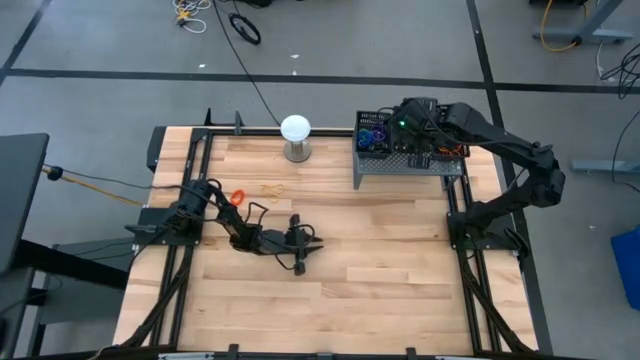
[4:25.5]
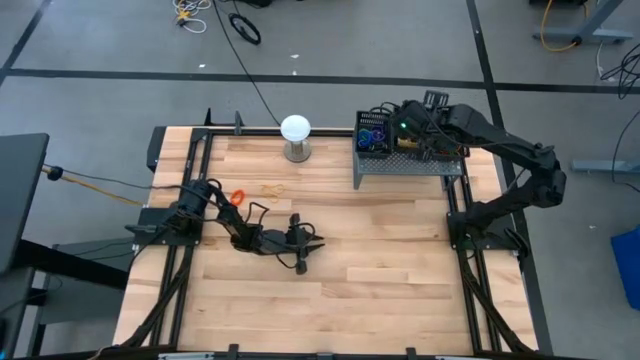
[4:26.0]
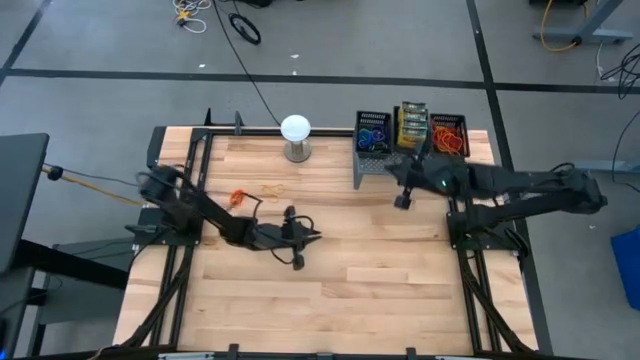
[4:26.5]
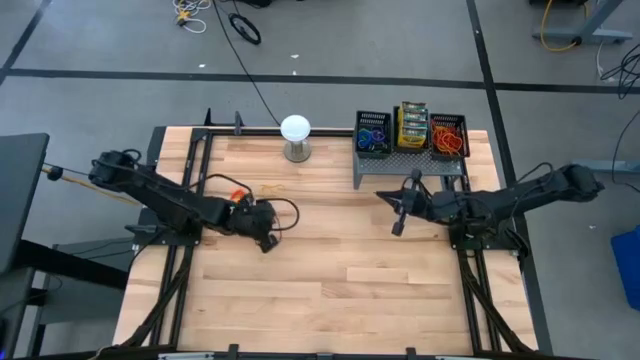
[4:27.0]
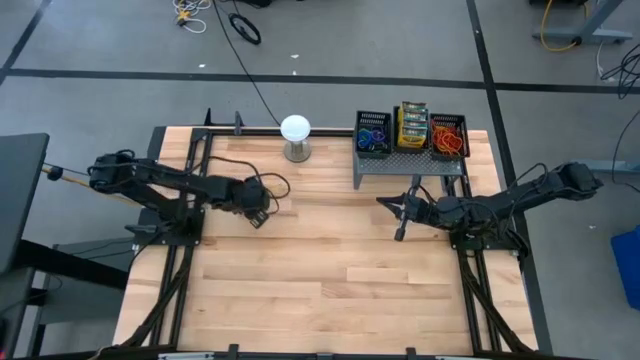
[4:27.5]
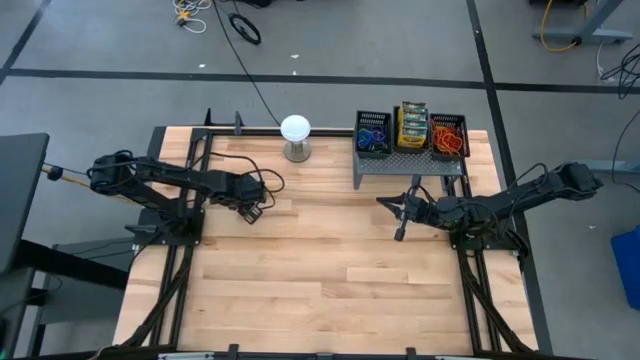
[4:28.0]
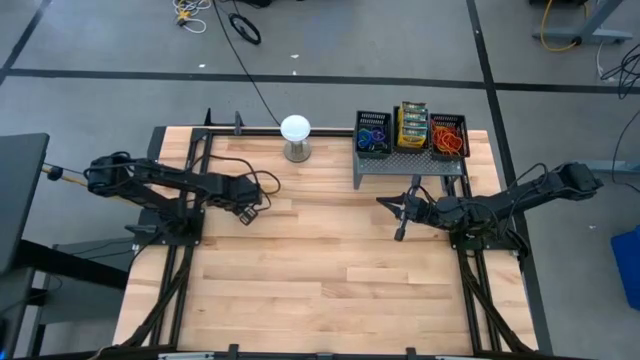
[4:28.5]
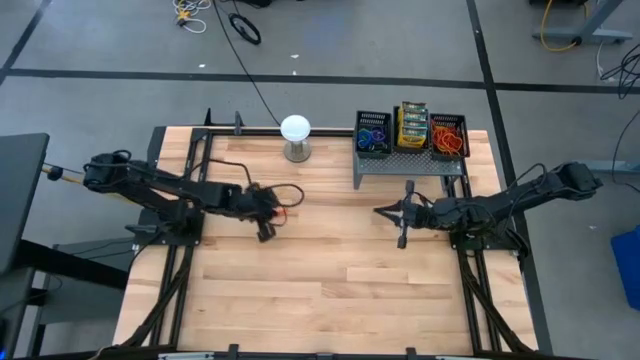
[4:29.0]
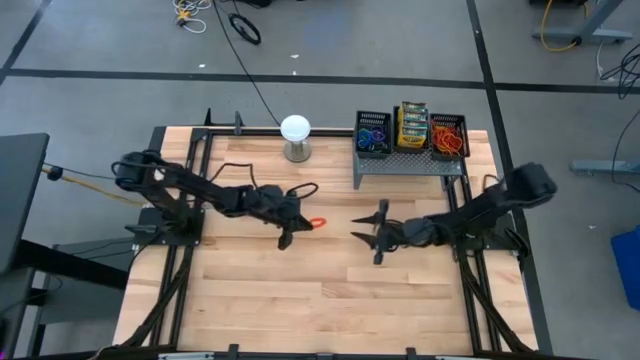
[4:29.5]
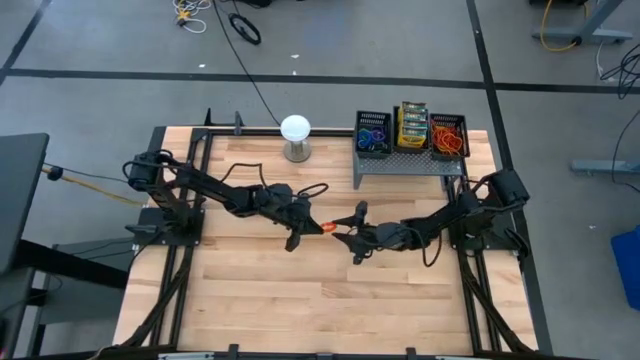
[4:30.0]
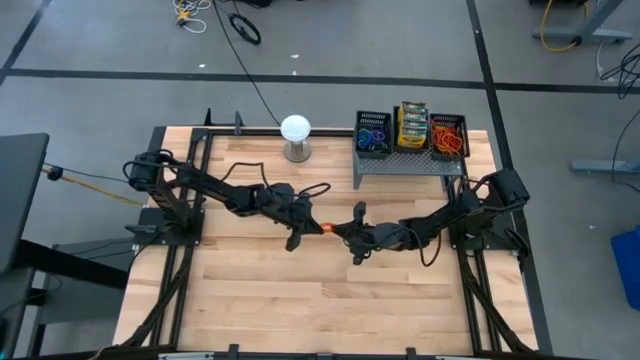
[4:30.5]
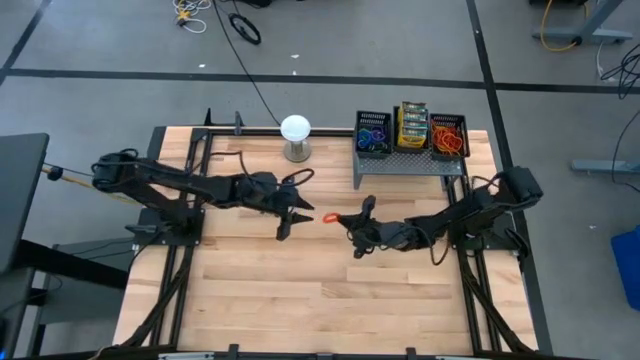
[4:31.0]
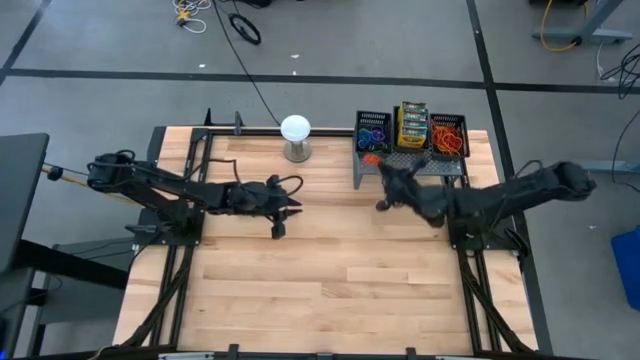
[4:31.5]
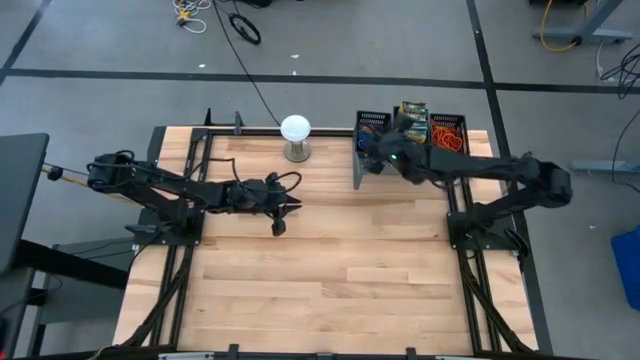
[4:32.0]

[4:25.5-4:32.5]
Task: Pick & Place Office Desk Supplies
Put the orange spring keychain into the left black basket on the shelf

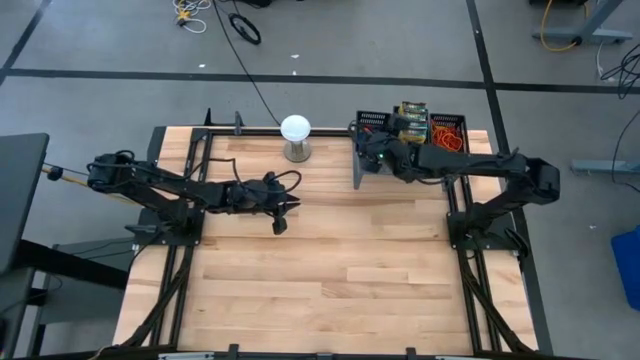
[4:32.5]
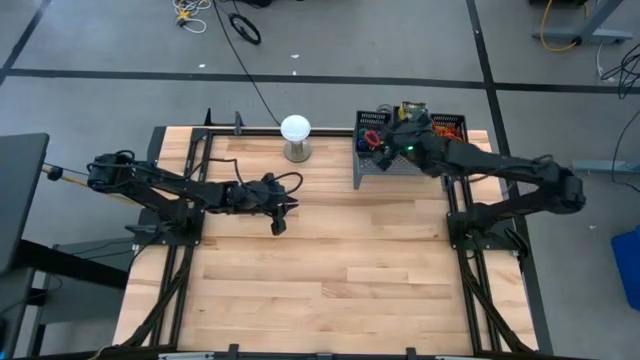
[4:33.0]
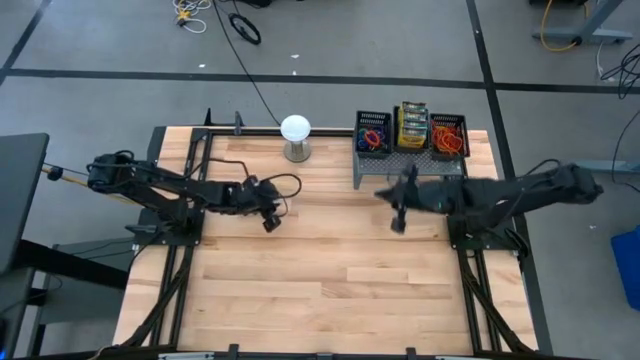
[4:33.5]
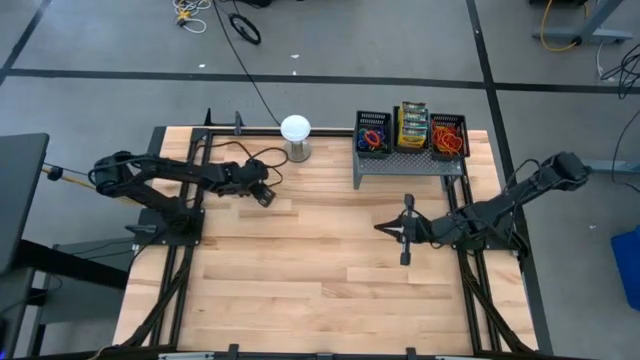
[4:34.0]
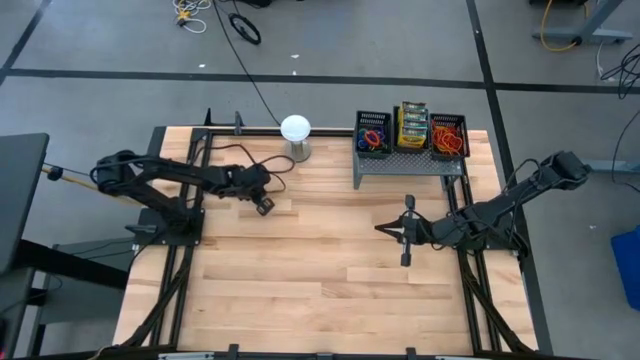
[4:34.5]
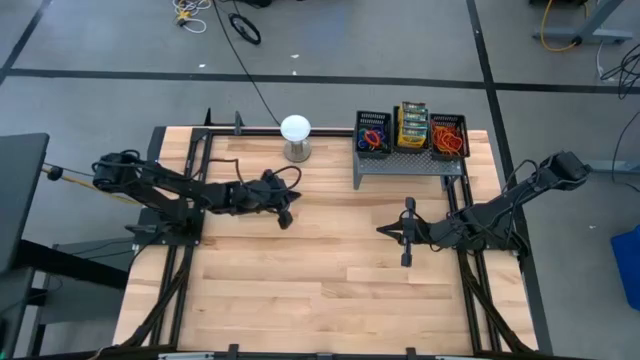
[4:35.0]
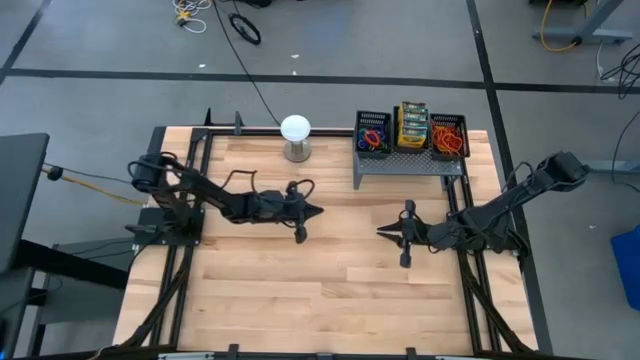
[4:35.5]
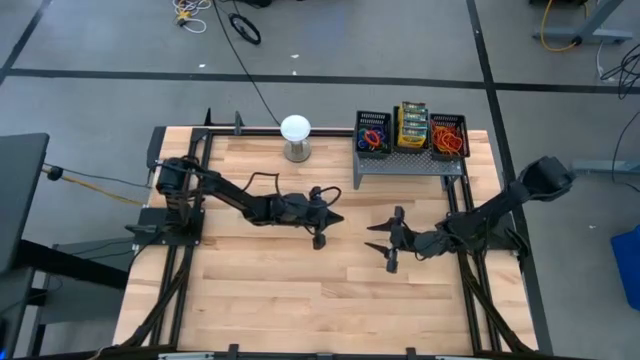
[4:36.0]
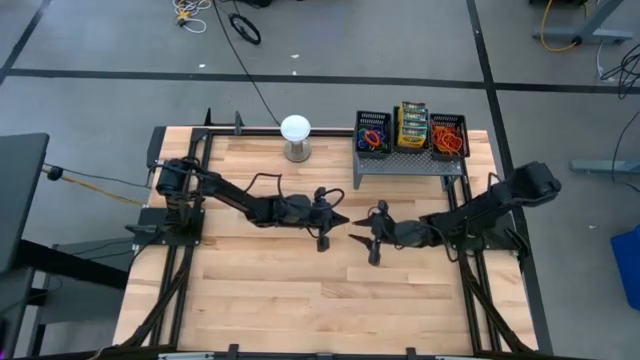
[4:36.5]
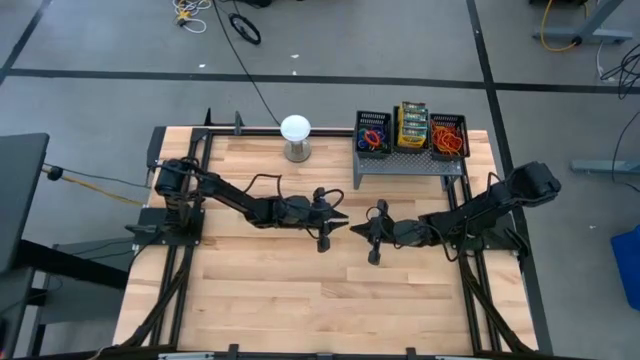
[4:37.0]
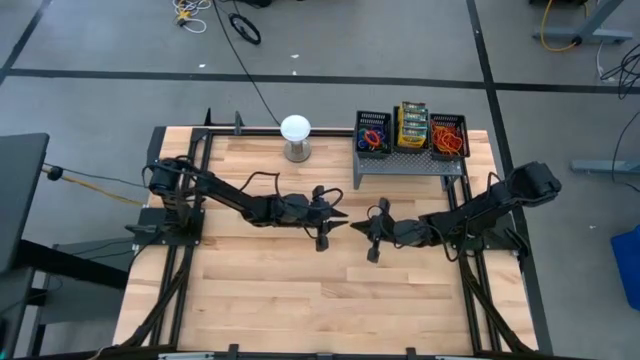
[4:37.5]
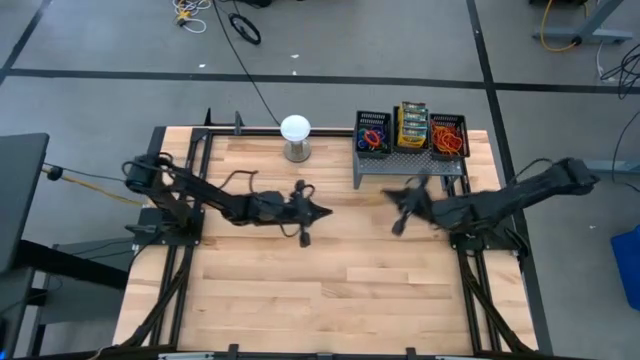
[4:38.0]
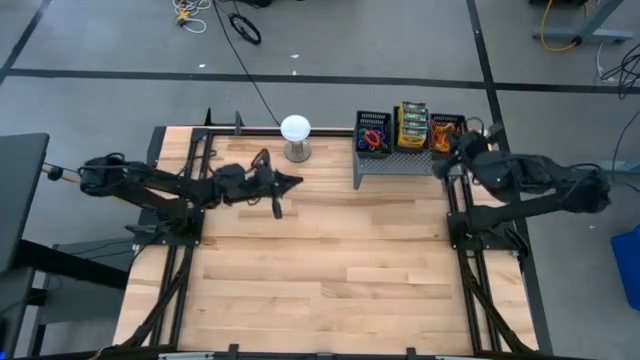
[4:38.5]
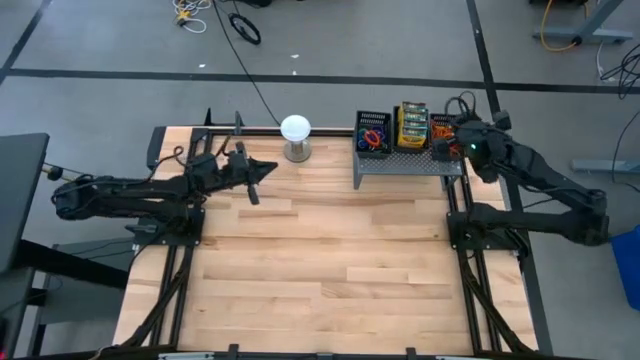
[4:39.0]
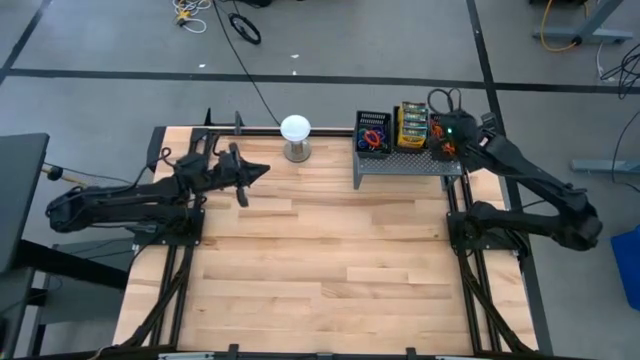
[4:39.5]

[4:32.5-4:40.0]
Put the yellow rubberband into the right black basket on the shelf

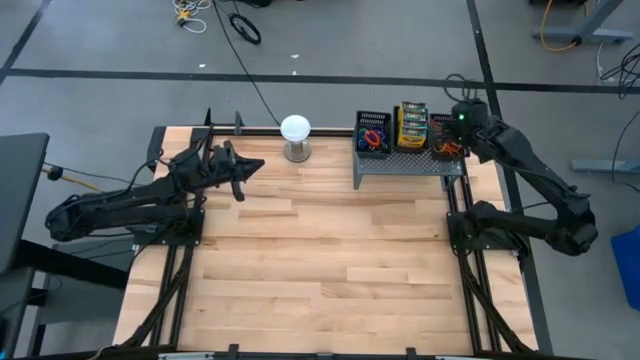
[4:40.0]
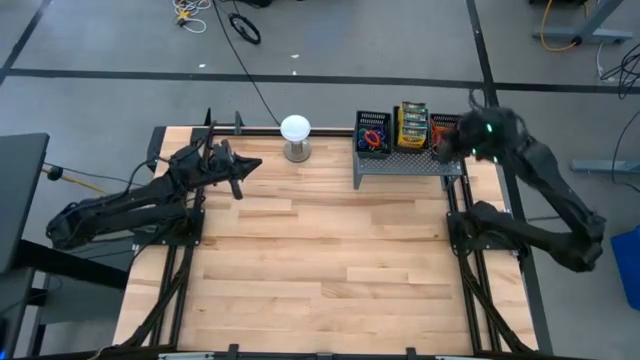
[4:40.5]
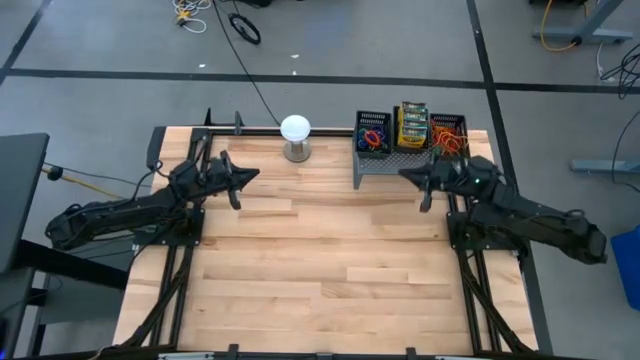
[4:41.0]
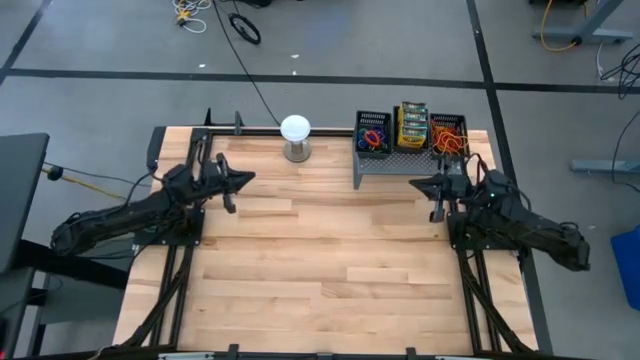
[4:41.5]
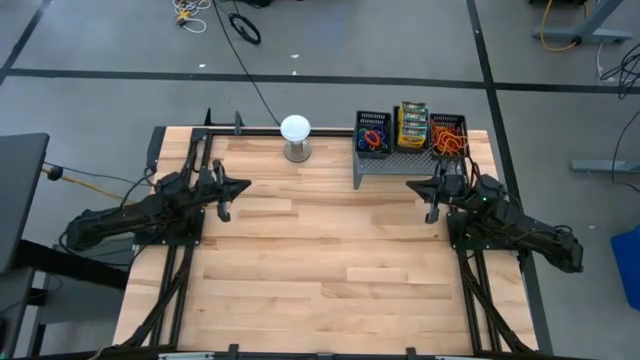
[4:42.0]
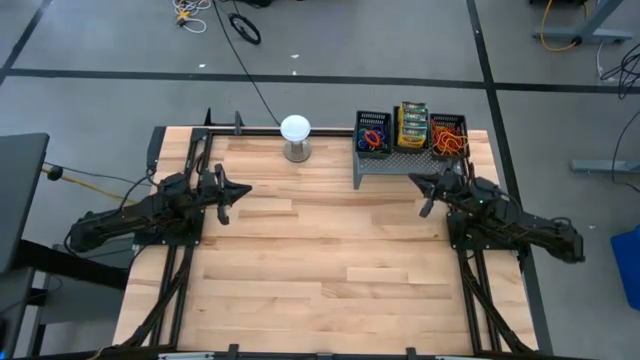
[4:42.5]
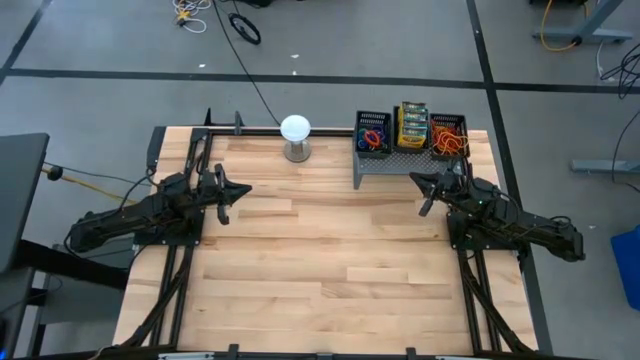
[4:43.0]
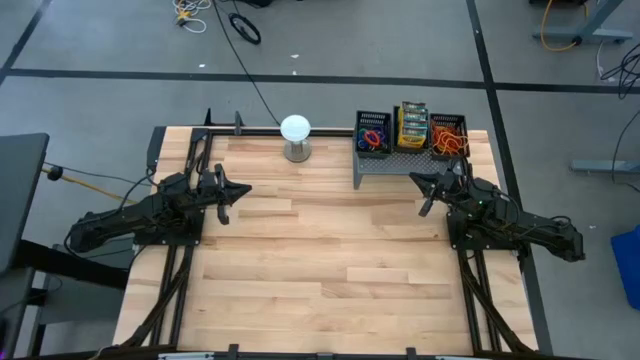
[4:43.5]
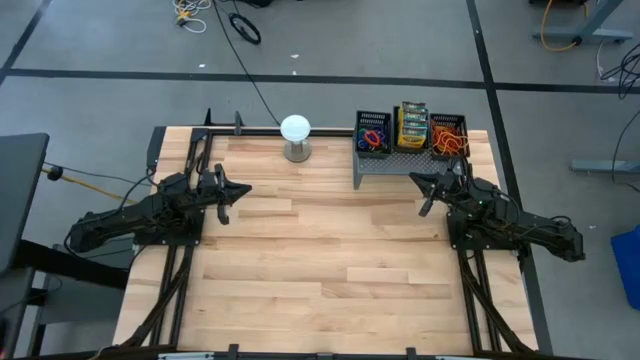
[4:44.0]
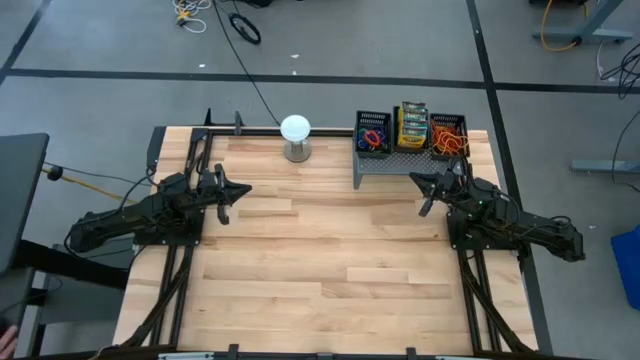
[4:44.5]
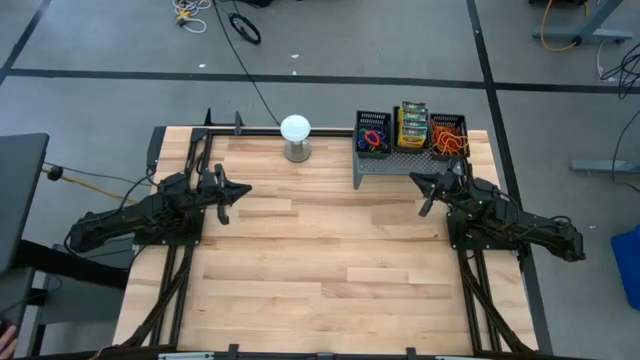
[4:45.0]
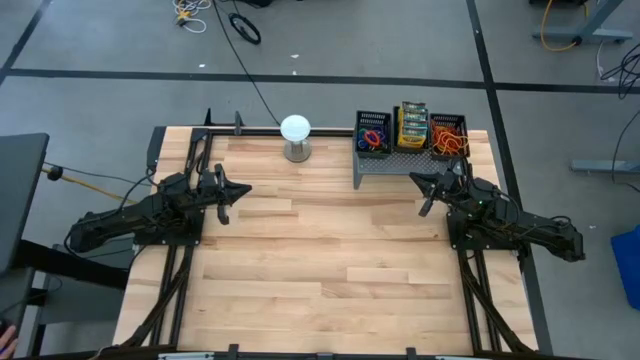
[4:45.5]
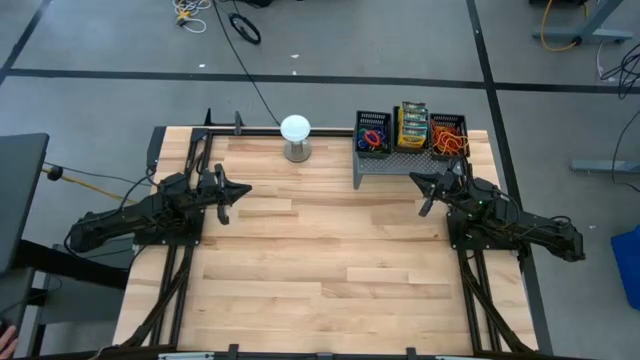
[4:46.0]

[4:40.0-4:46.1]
Return to Home Position

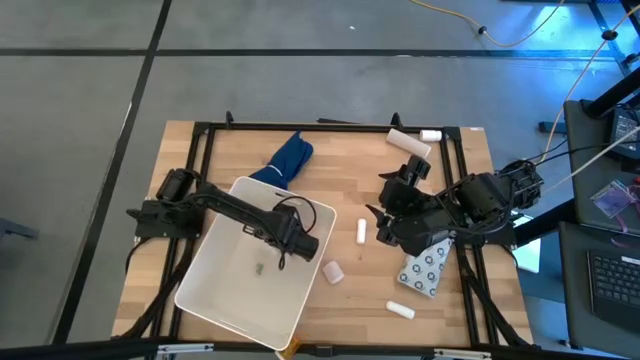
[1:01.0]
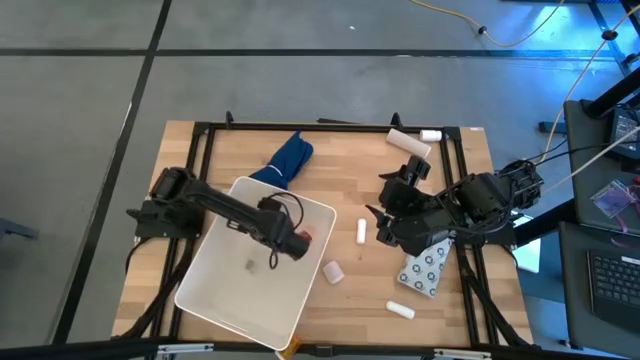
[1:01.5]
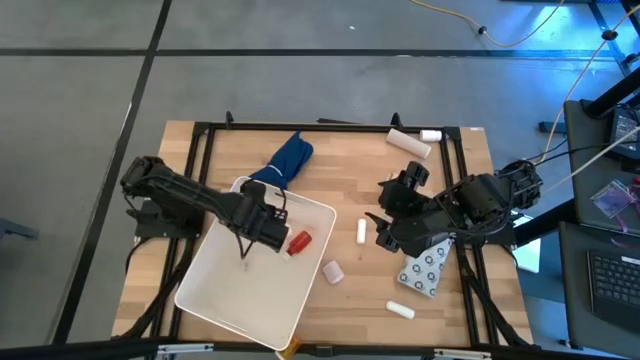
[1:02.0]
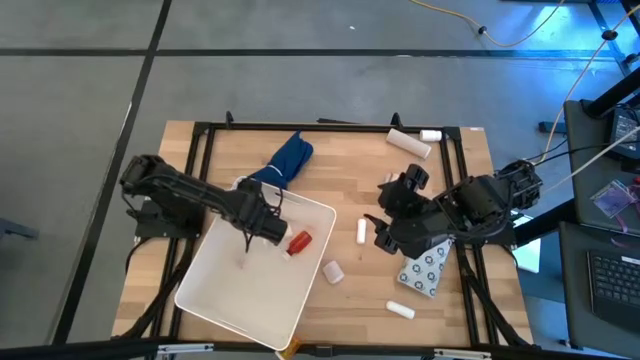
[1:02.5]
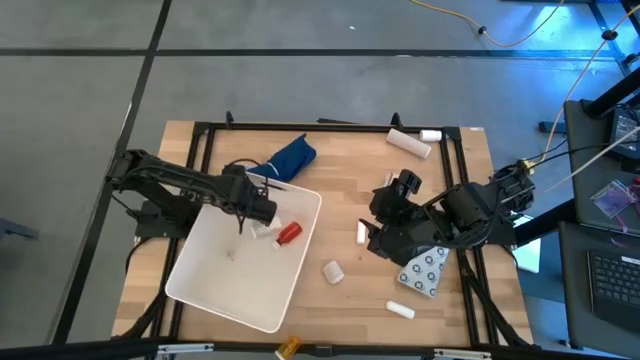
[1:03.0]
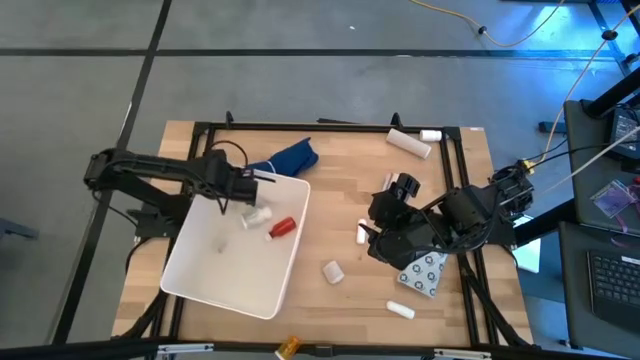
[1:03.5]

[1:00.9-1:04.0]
Task: Pick & place medical supplies in basket/bin
Adjust the white bin
